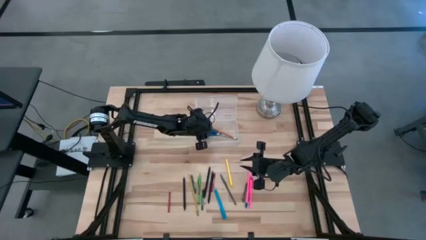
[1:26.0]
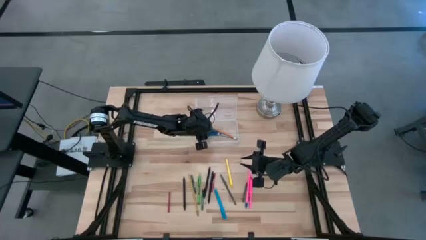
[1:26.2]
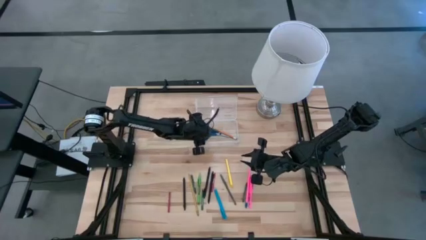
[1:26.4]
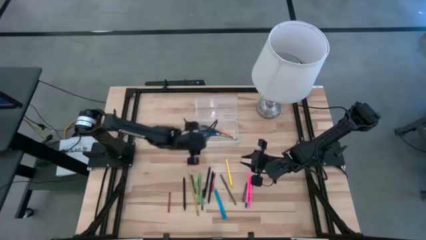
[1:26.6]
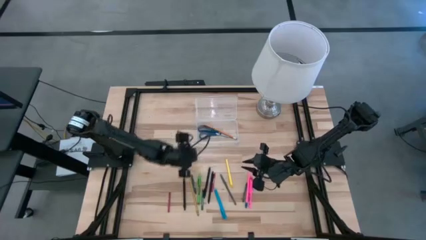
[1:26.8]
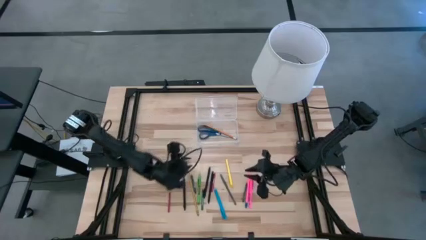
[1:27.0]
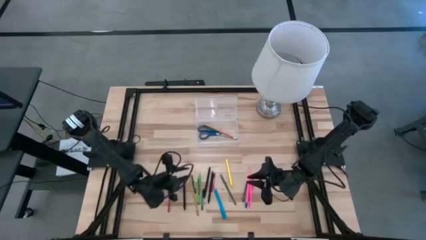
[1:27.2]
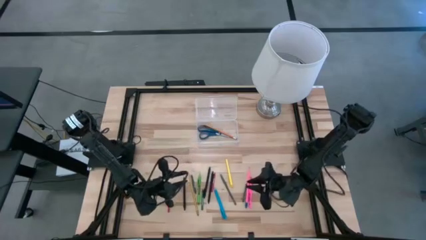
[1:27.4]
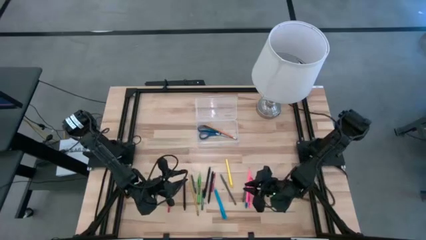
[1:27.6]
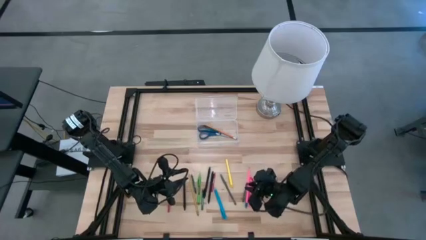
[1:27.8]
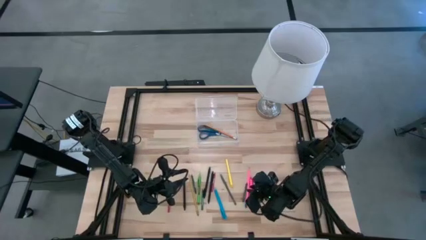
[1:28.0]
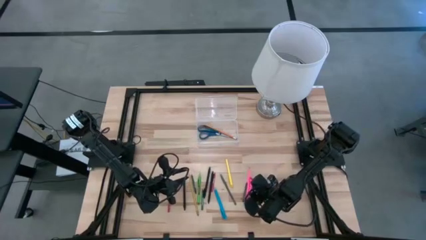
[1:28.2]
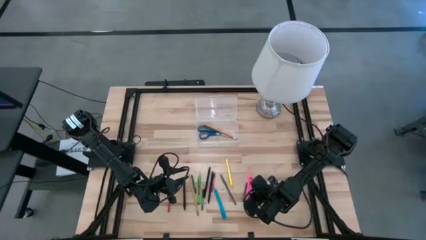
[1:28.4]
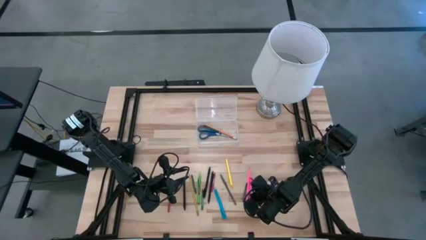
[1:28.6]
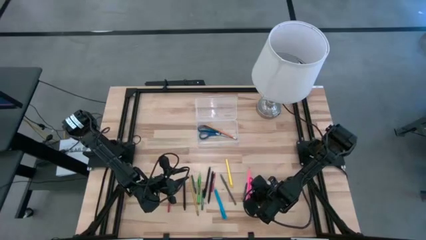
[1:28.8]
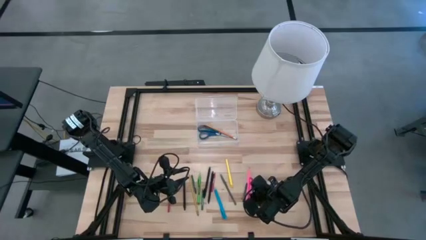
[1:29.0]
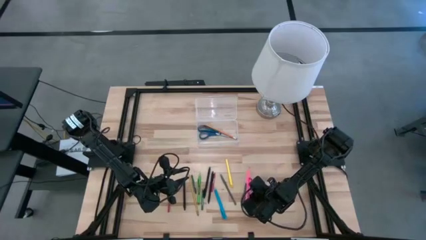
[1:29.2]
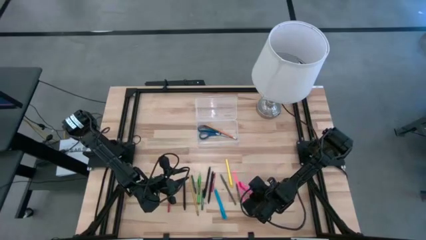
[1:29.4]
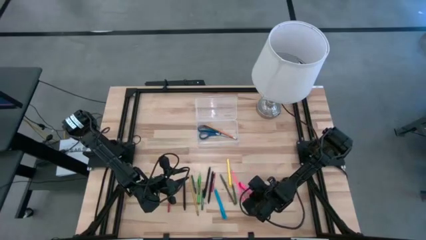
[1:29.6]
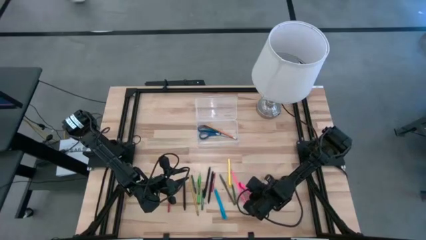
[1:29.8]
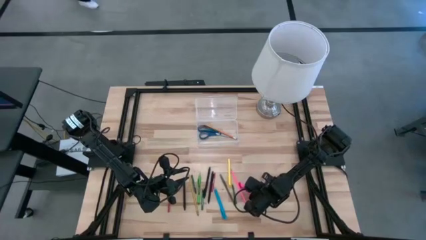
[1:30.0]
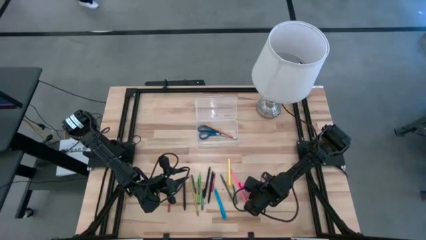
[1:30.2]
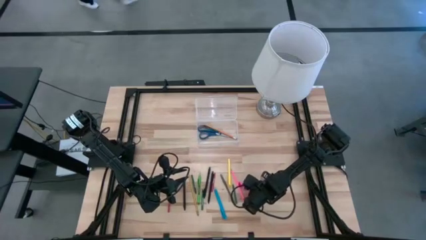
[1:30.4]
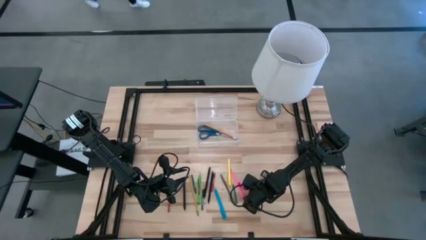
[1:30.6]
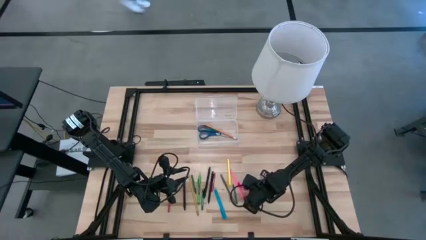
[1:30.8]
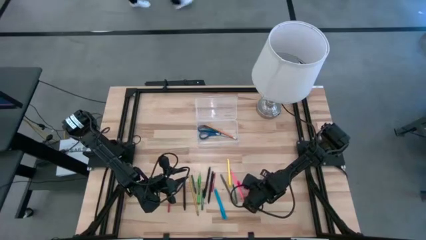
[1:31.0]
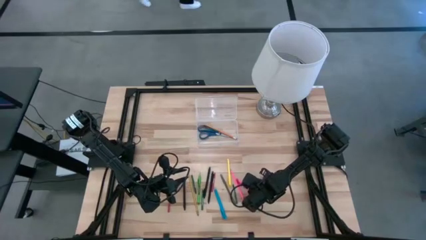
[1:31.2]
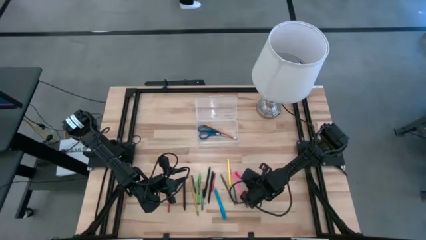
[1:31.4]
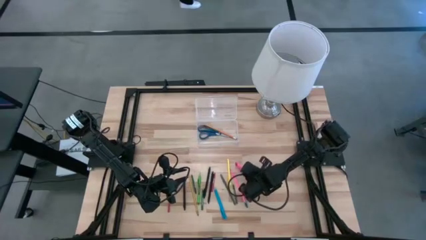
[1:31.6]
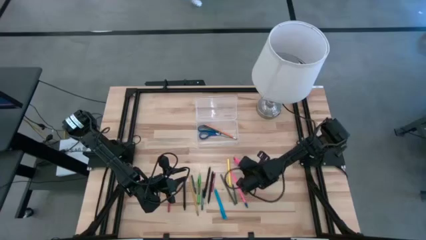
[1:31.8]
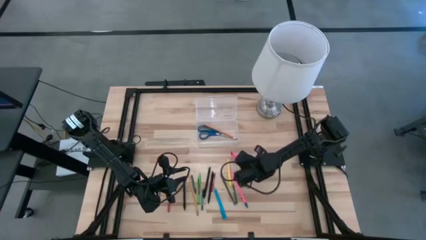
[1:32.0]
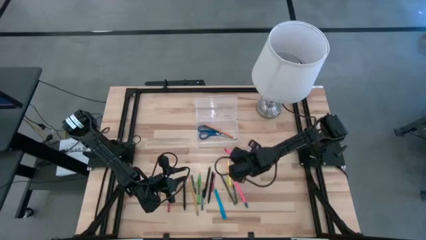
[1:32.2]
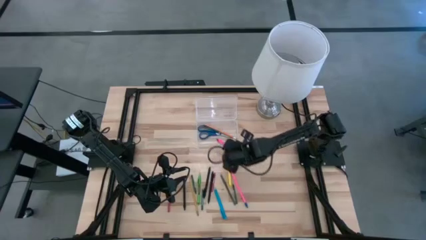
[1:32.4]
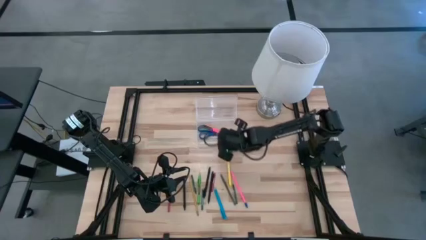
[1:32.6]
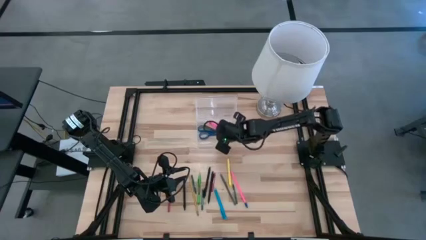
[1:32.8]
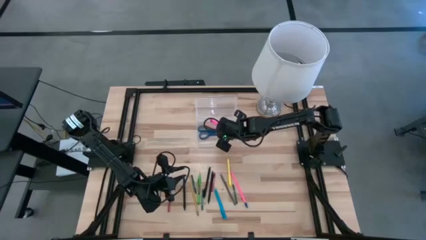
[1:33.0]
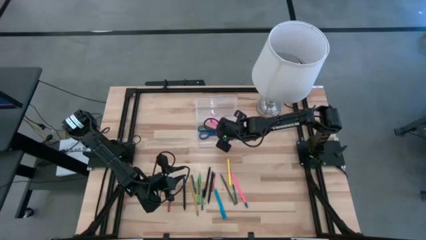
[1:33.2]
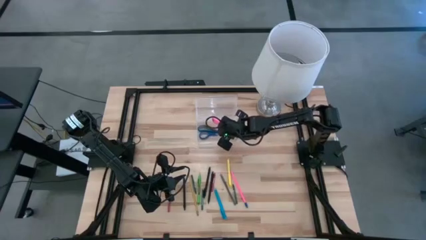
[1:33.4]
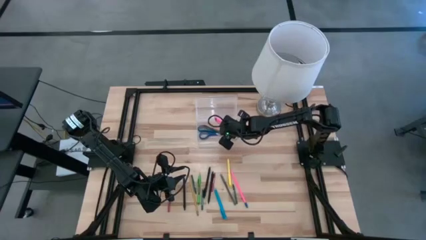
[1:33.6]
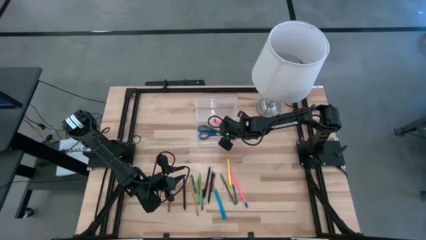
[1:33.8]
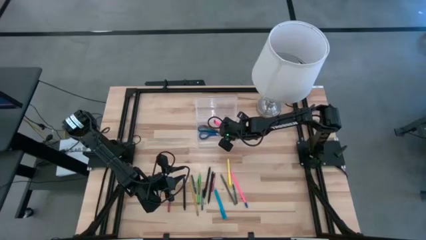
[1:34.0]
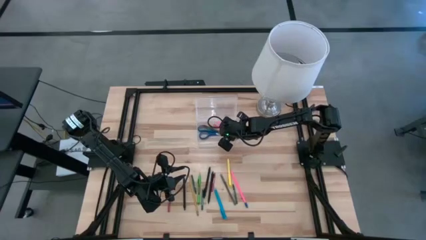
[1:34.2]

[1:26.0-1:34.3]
Task: Pick & place school supplies into a supply box
Put the pink pen into the supply box

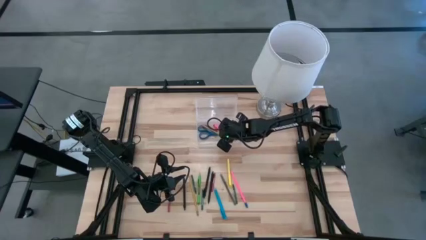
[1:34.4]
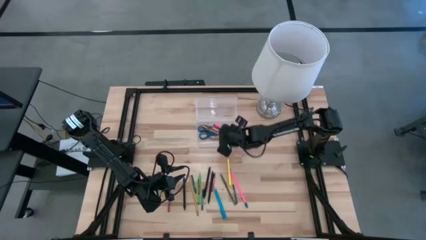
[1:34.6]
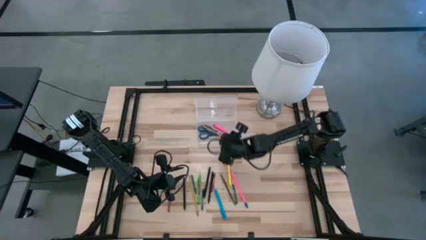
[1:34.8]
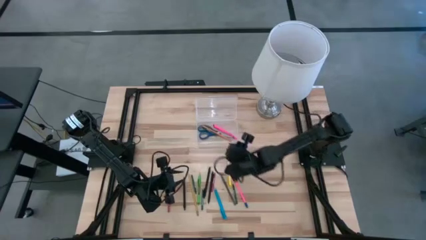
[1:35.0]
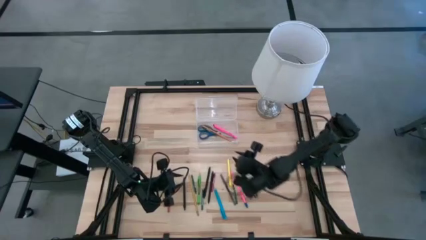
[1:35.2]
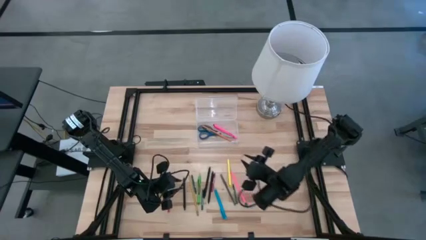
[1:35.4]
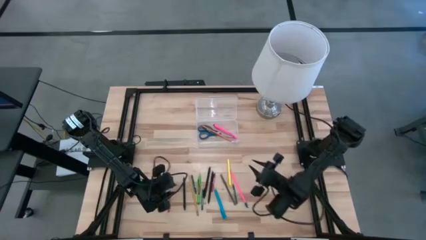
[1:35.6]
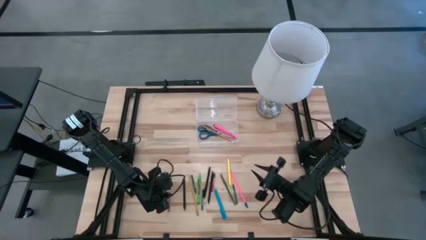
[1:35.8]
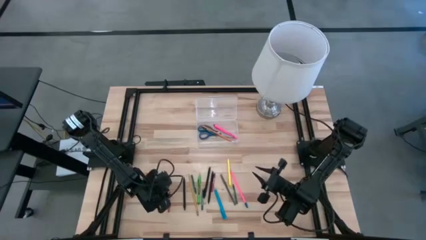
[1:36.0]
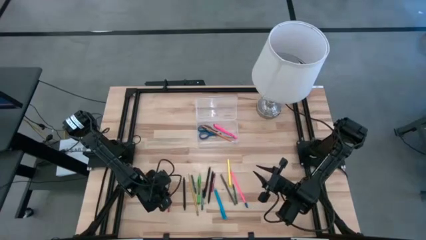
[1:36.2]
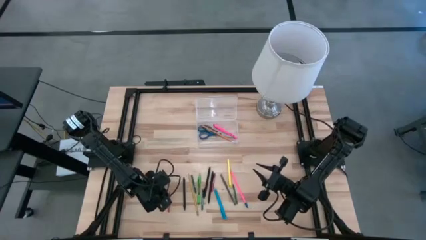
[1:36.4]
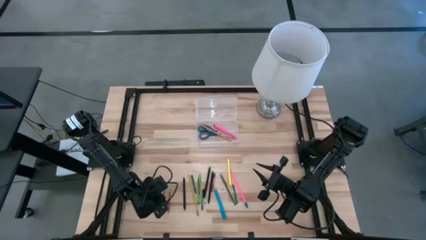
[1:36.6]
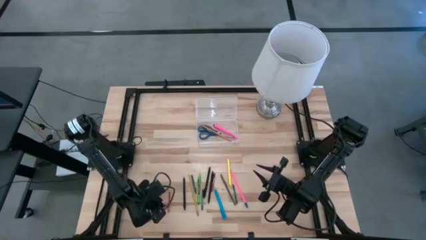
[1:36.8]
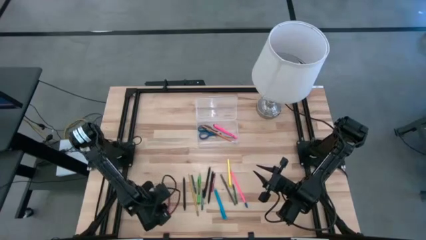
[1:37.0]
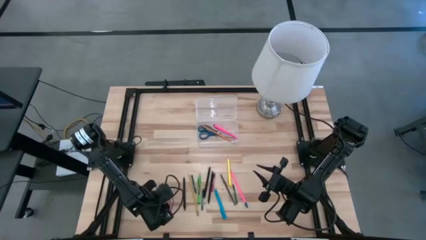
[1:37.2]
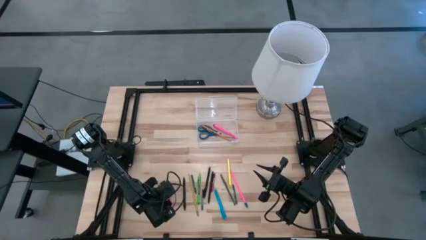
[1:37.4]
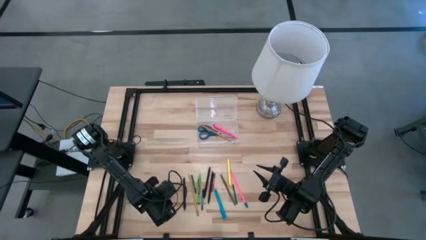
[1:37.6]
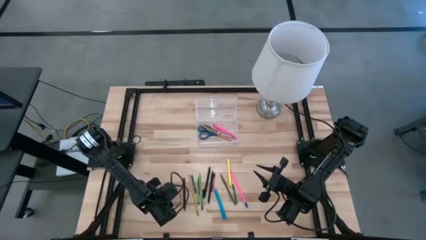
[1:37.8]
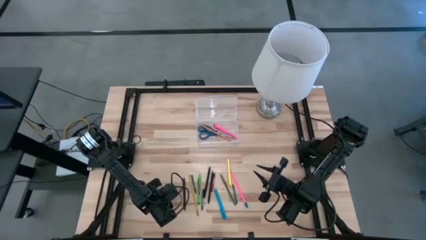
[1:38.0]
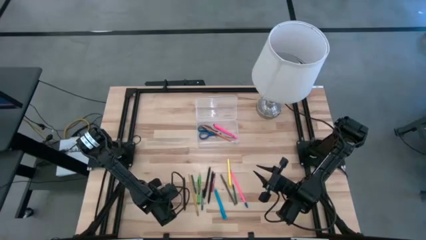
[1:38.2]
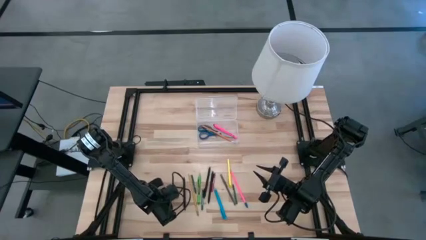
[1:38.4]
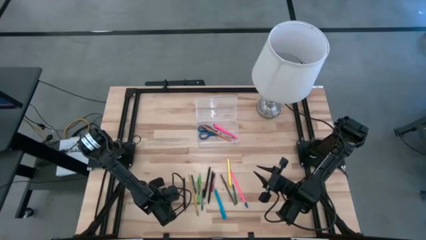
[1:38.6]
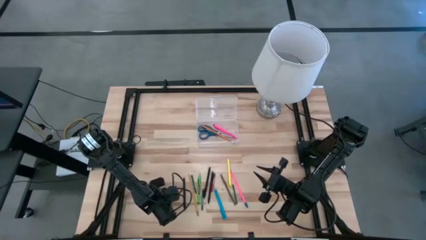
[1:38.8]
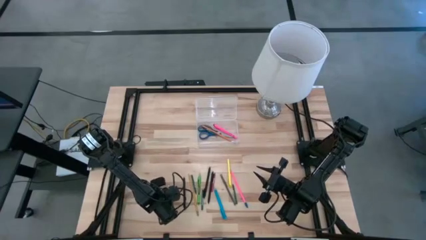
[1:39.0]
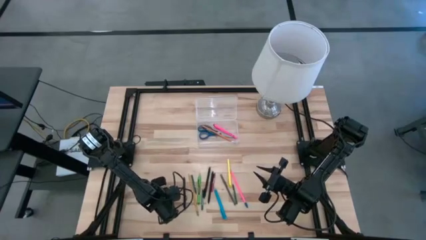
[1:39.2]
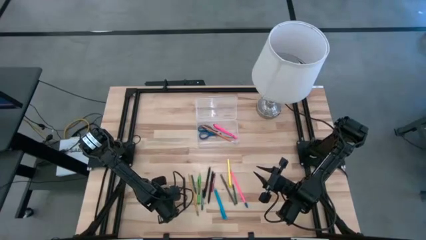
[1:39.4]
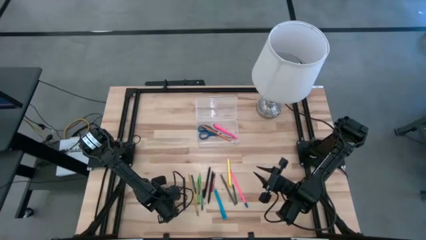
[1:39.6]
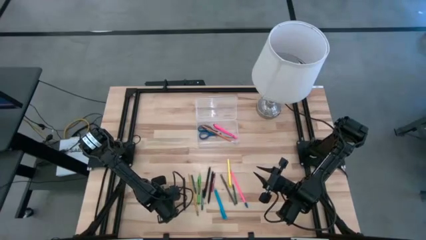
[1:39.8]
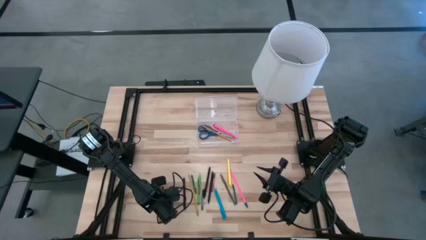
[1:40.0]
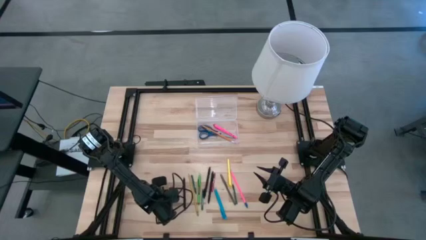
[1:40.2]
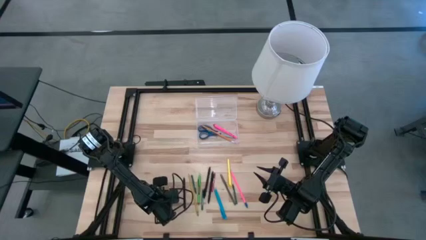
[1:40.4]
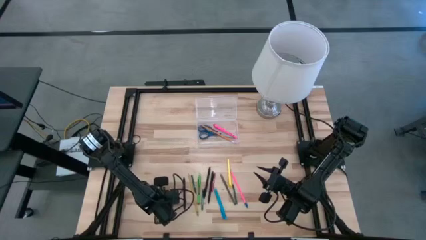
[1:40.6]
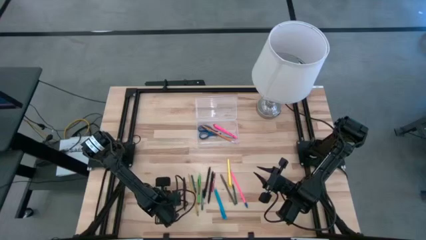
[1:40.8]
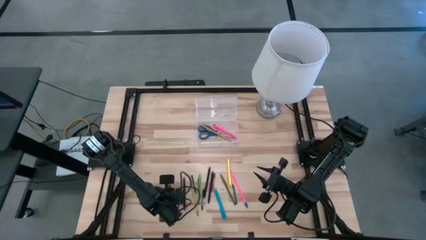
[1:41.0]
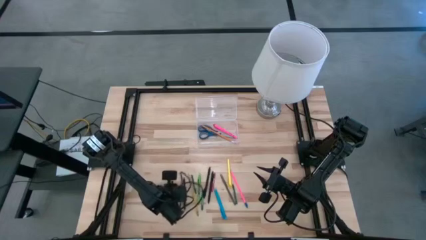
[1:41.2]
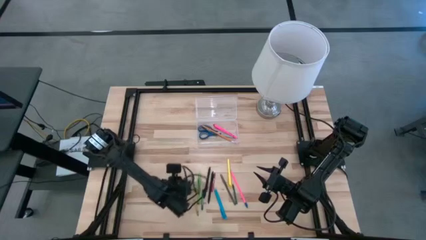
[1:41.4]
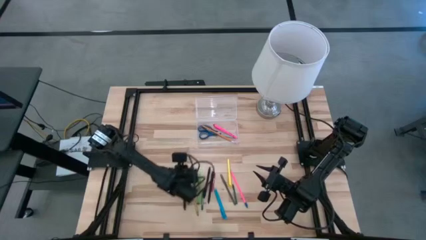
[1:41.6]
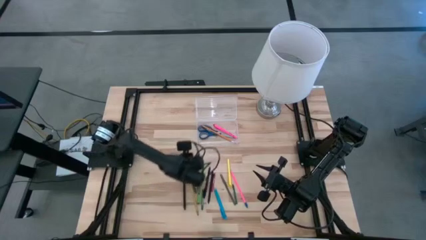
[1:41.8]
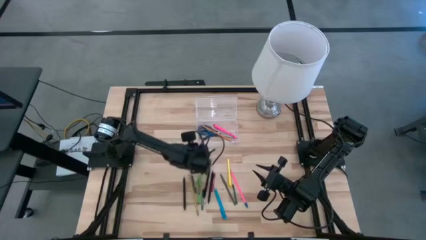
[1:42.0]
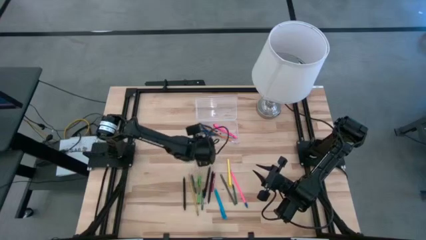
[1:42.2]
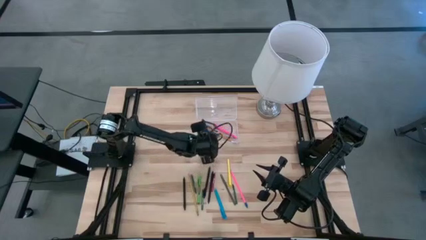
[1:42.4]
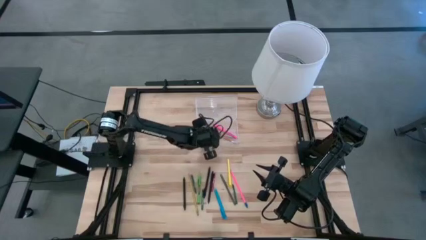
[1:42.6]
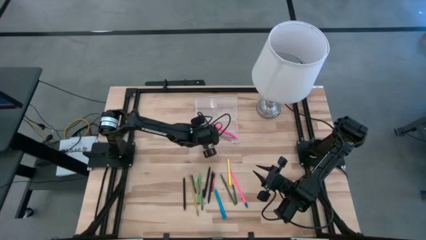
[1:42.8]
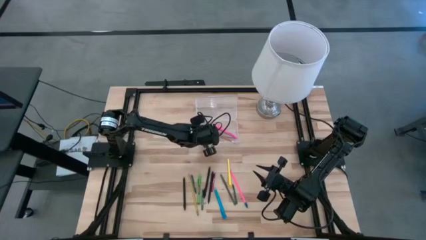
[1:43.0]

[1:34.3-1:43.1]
Put the left red crayon into the supply box
